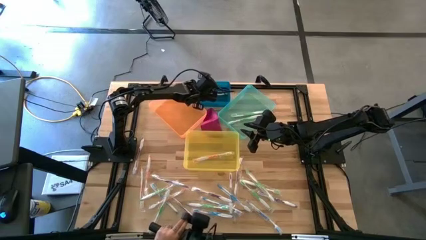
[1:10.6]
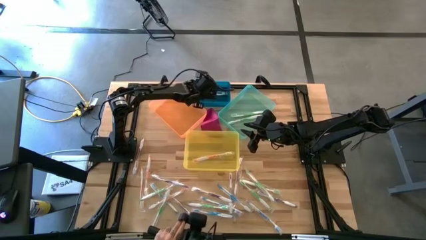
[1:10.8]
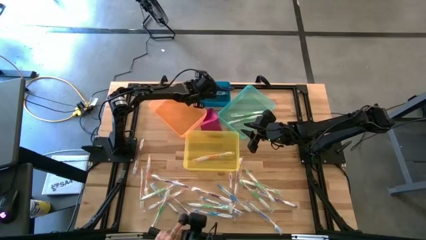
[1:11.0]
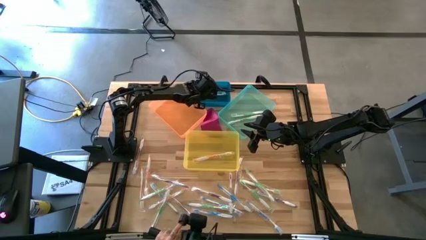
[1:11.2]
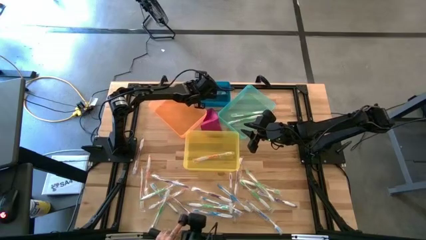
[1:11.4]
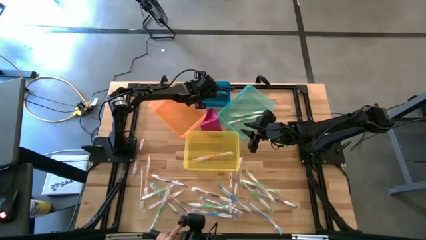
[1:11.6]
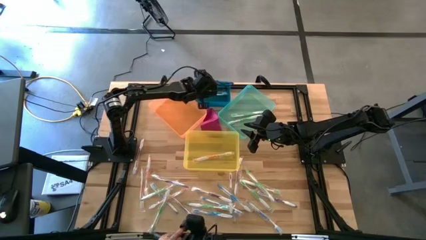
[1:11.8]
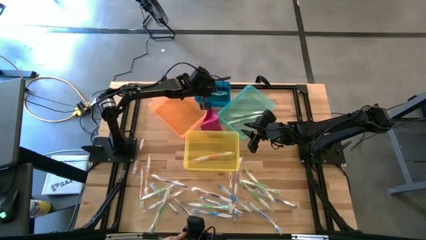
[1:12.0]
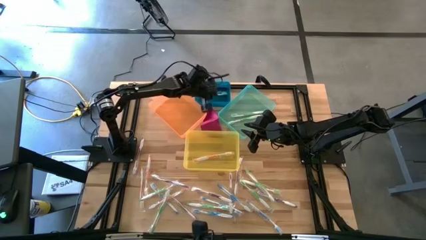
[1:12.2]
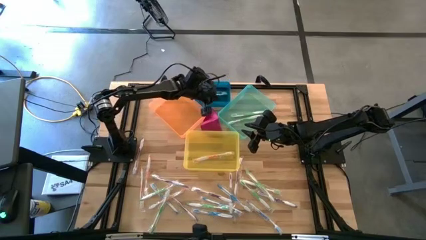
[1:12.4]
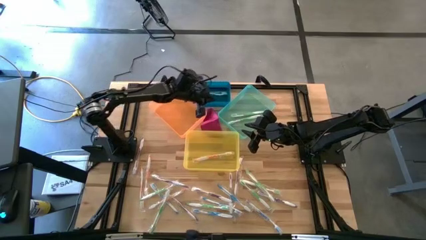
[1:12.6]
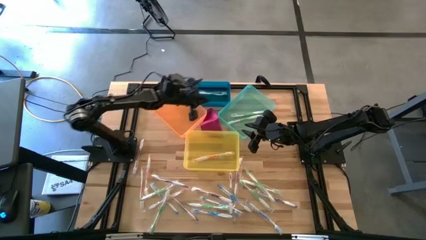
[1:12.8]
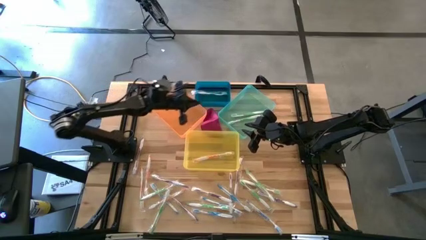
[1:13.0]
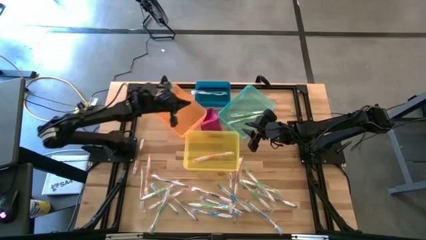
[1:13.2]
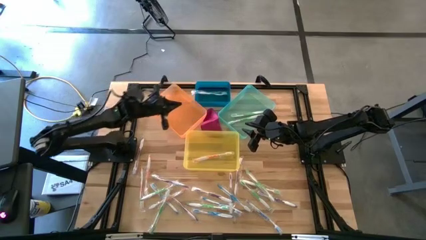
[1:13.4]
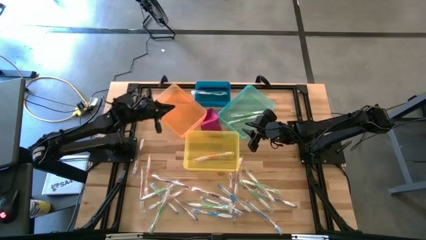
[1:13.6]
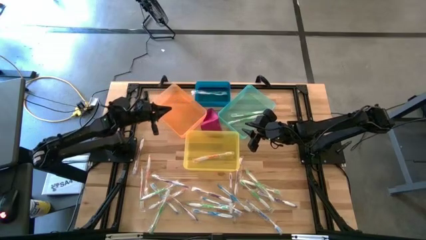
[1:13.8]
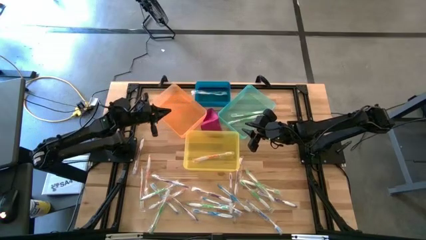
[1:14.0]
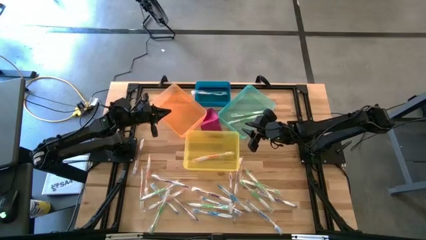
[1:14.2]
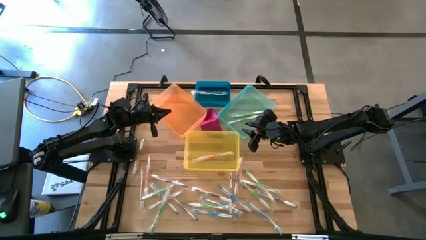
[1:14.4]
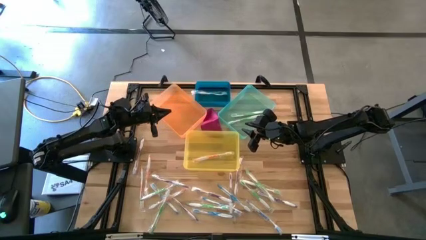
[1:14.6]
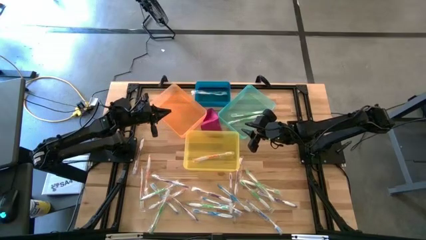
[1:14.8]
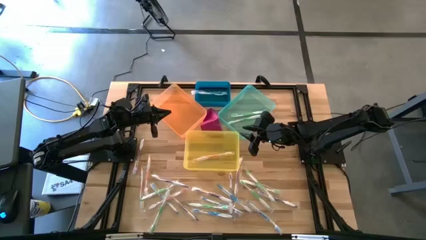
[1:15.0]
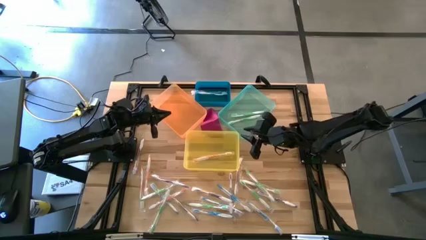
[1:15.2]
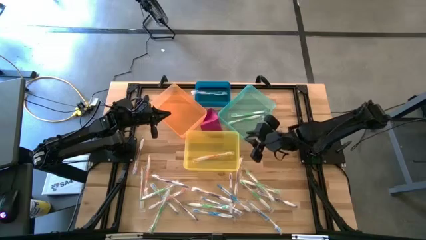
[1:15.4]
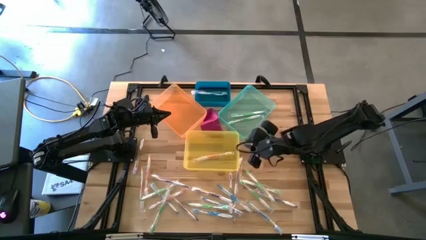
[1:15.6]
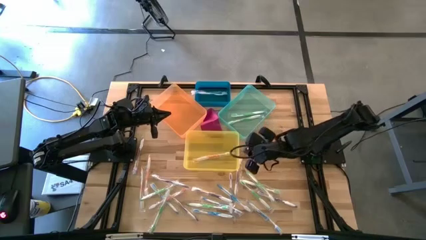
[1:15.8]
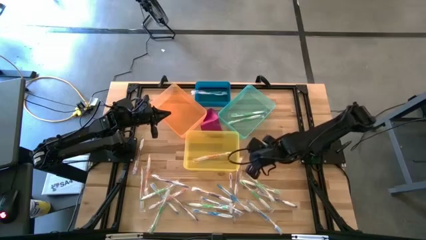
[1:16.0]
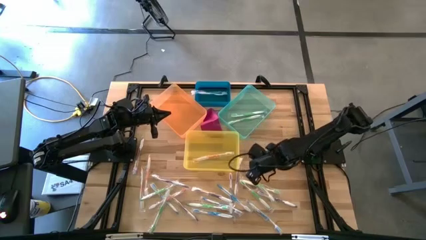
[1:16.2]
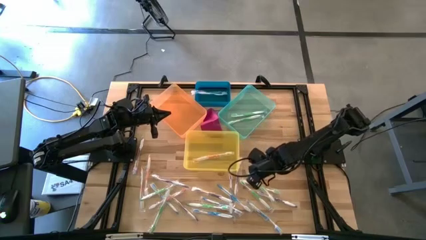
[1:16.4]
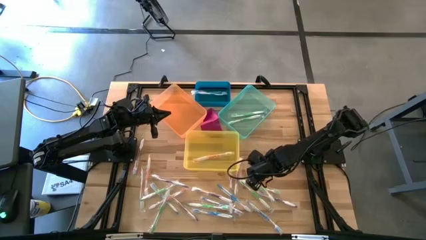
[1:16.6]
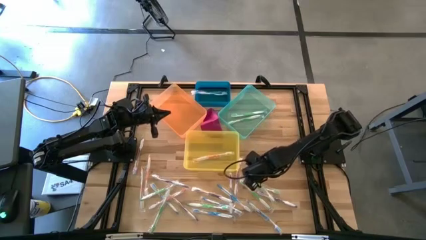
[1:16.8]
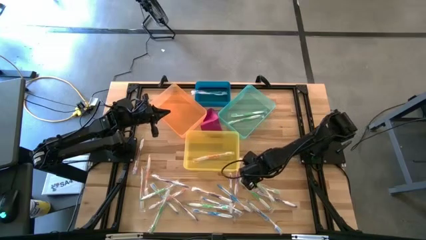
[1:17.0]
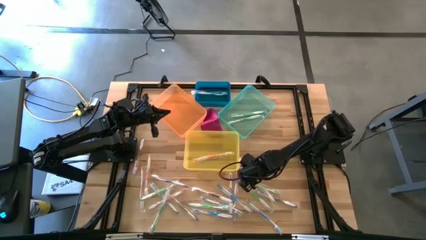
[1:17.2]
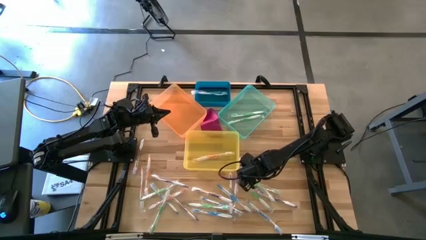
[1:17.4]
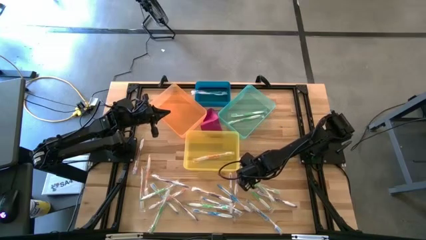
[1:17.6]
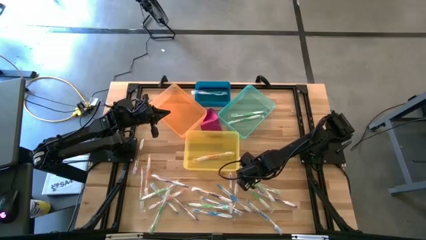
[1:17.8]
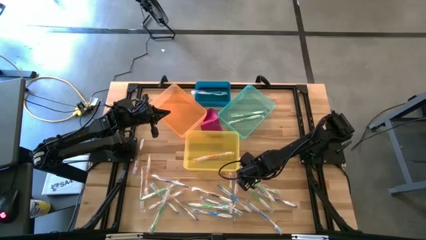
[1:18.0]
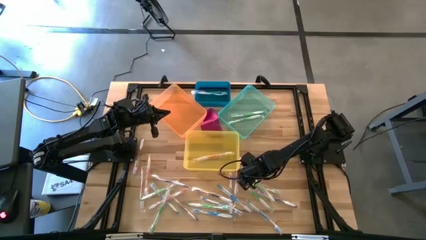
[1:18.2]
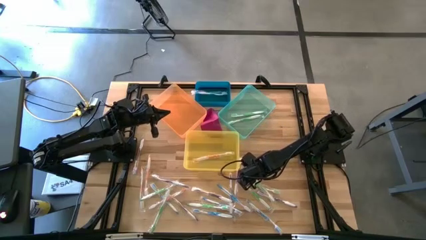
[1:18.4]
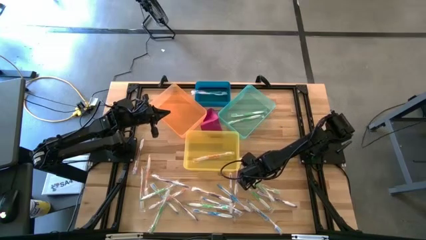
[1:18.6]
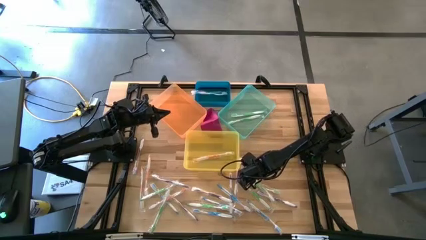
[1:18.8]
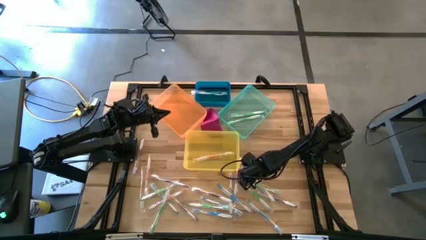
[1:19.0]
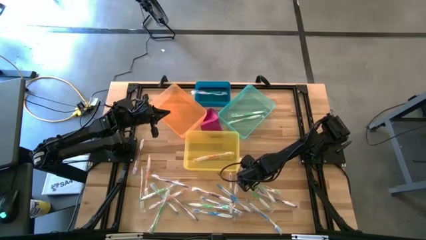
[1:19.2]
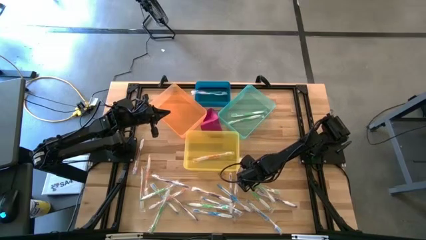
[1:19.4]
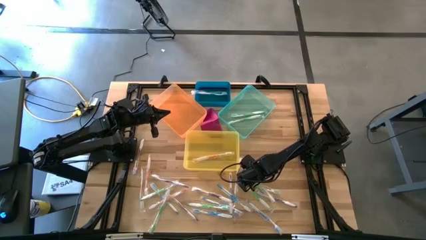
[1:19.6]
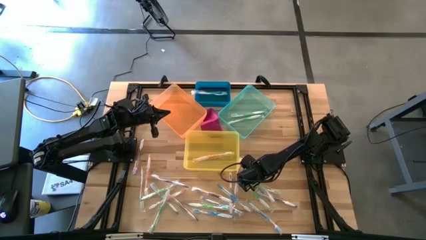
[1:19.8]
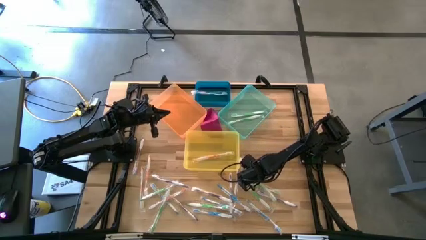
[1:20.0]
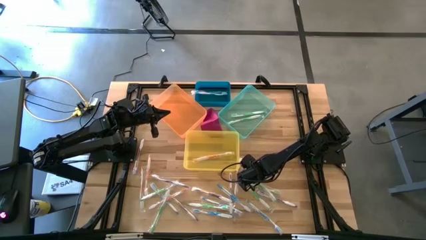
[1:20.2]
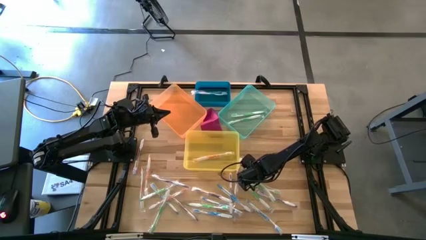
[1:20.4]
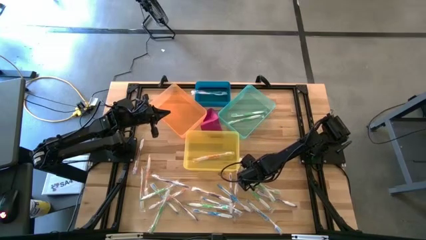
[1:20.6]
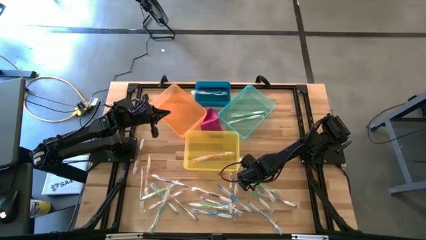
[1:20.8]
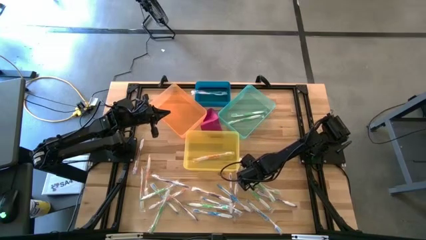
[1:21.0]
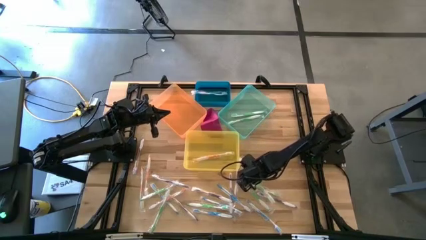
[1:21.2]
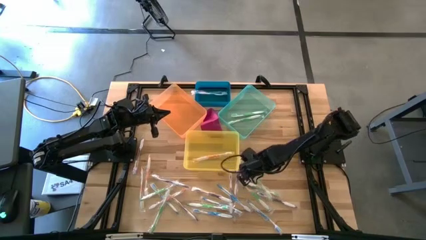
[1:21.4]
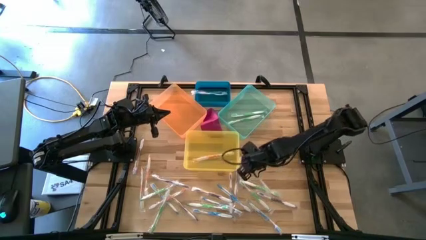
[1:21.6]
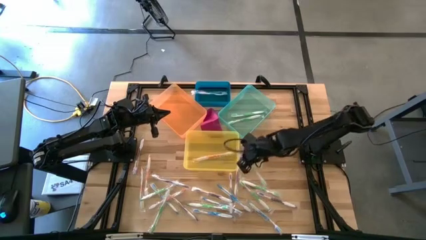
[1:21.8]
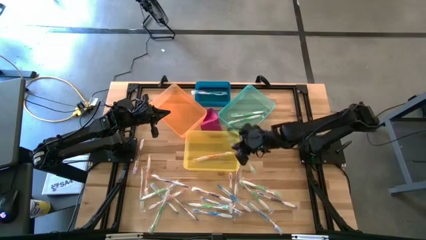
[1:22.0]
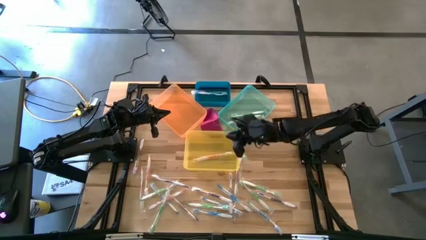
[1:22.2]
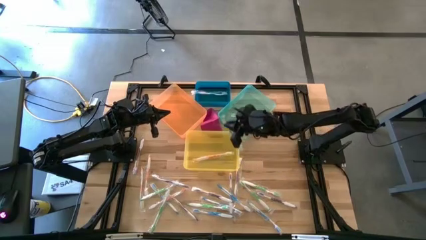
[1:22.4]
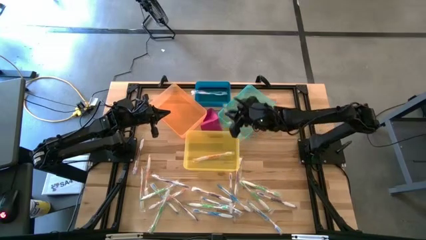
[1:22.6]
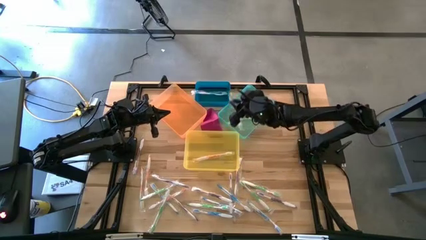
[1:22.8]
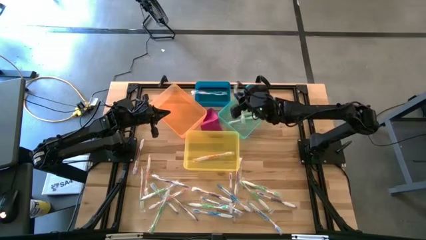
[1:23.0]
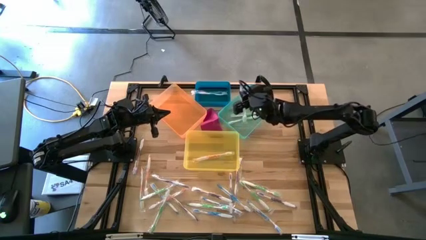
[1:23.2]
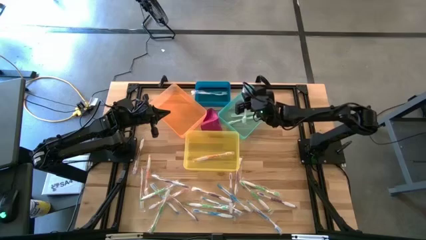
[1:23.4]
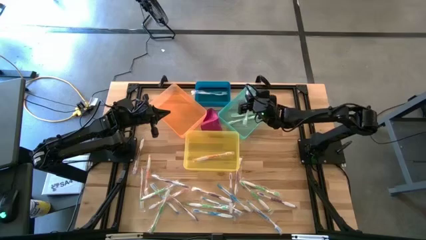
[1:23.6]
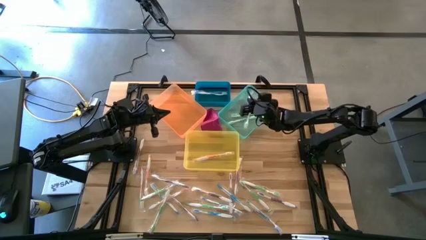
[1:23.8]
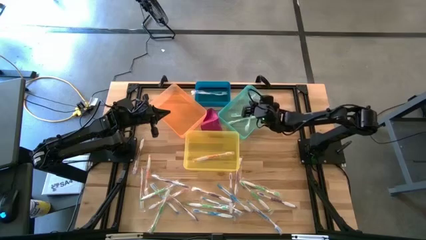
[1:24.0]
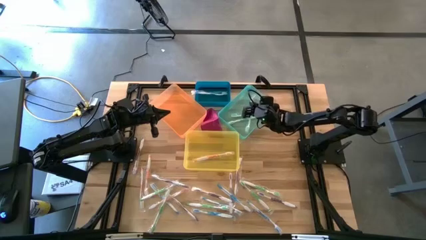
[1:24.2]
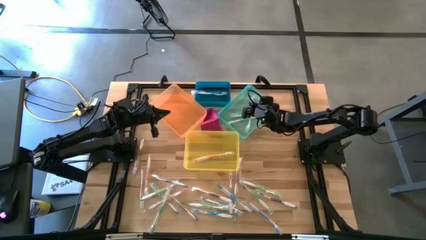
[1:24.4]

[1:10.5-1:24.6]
Task: Pick & Place Toothbrushes
Put the green toothbrush into the green bin

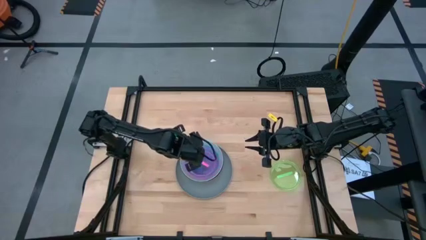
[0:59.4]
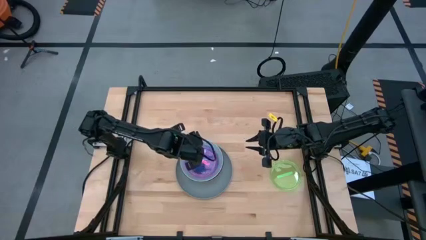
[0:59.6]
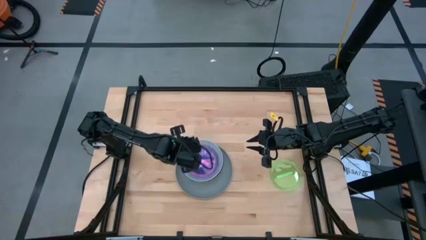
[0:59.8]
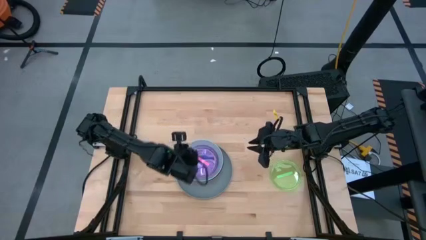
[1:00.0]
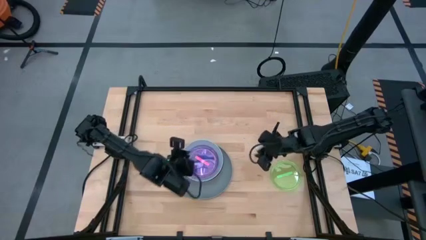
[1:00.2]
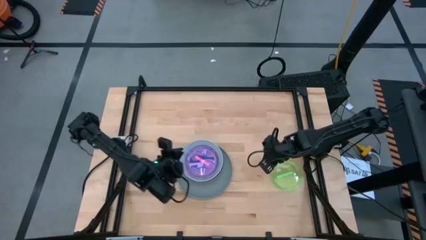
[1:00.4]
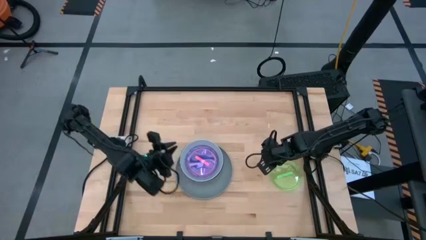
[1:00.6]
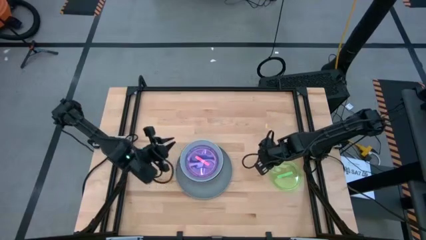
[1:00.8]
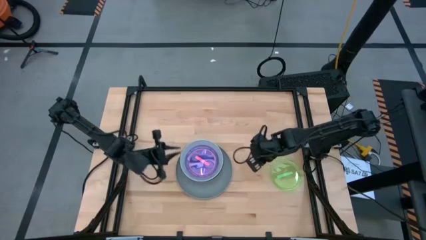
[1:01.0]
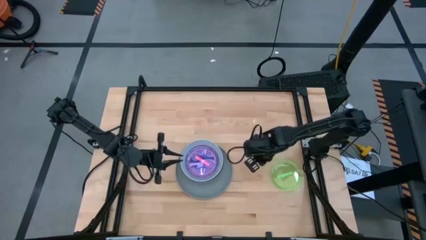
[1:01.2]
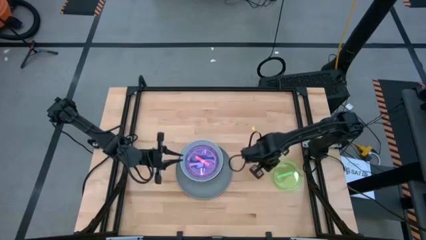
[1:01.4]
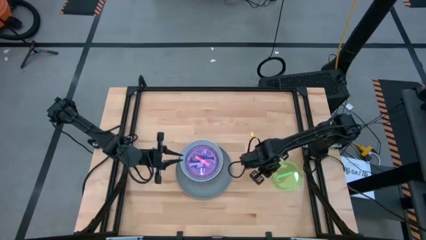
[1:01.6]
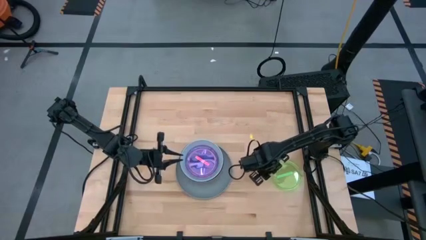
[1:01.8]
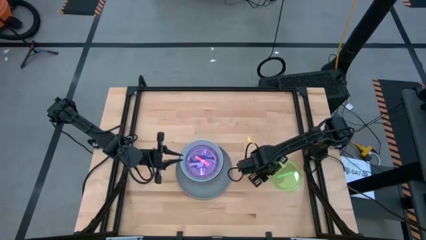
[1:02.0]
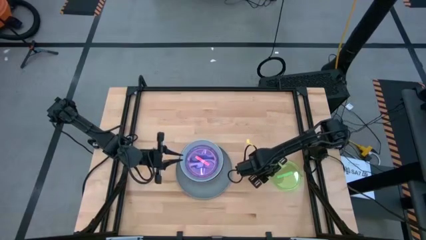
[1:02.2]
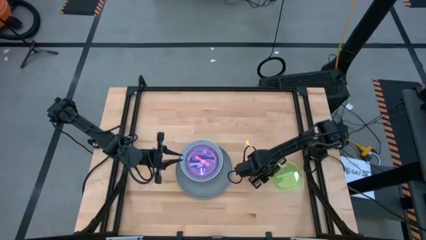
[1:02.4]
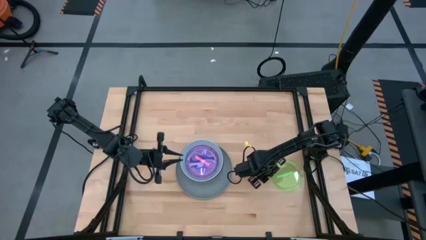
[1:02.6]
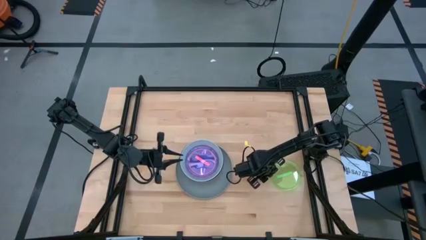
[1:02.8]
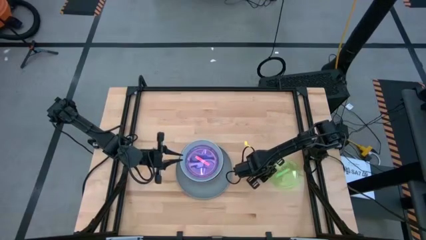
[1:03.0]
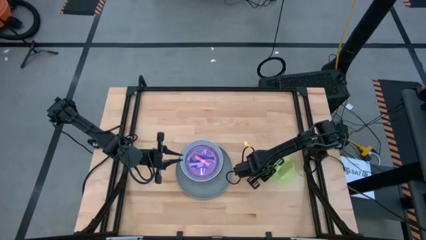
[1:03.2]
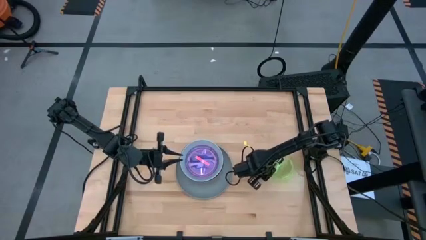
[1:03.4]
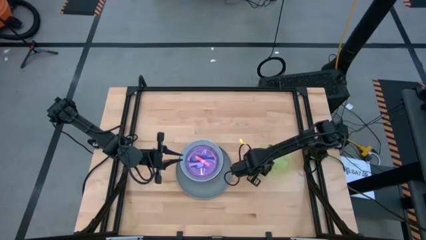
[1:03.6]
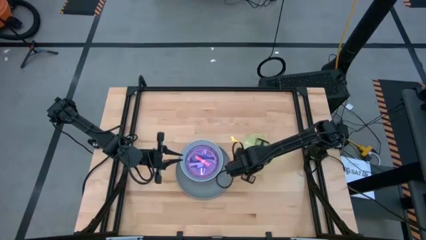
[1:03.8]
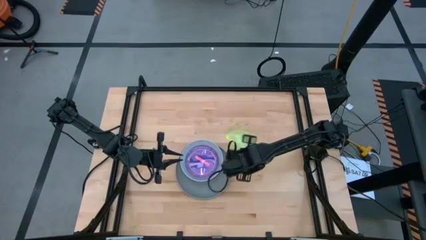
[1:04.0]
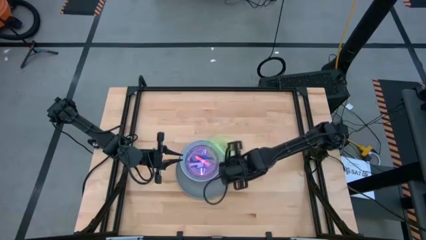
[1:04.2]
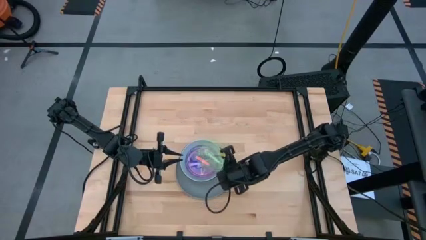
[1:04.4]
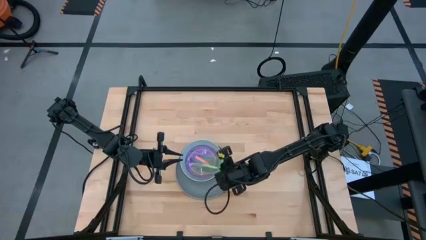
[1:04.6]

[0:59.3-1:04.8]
Task: Stack plastic plates
Stack the green plate on top of the pink plate
